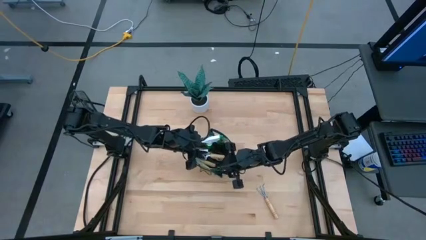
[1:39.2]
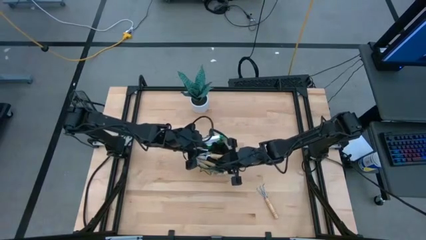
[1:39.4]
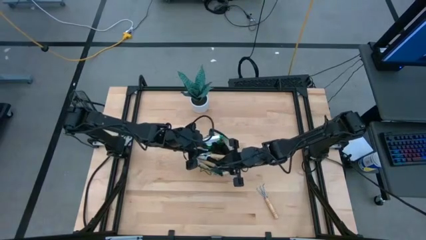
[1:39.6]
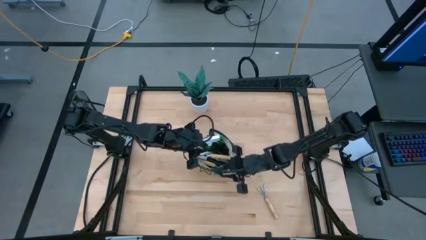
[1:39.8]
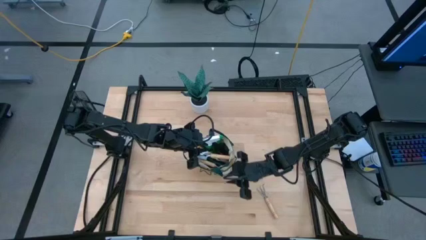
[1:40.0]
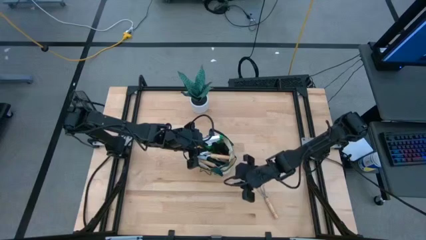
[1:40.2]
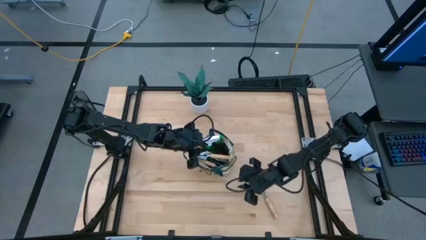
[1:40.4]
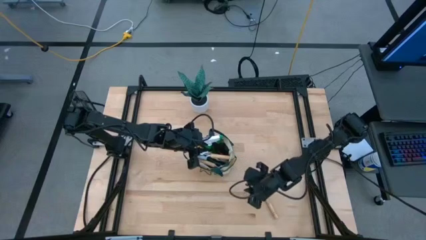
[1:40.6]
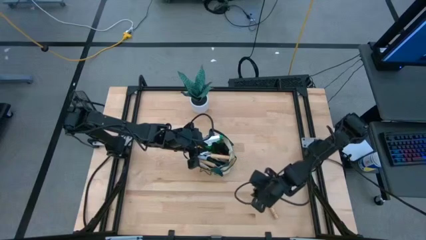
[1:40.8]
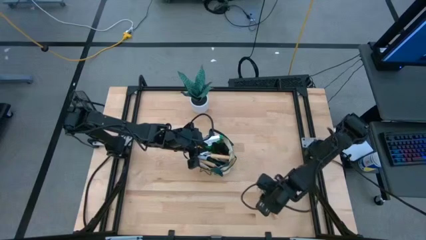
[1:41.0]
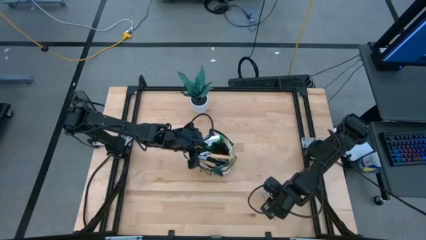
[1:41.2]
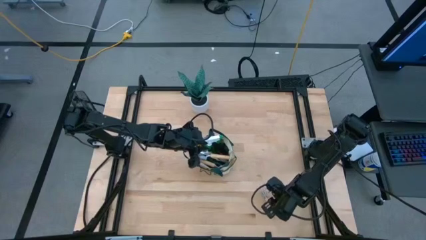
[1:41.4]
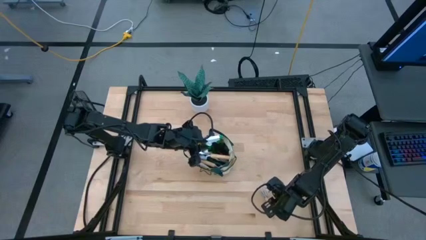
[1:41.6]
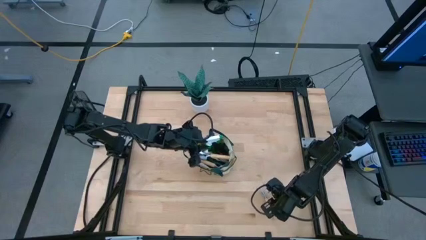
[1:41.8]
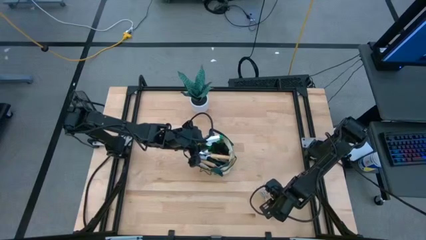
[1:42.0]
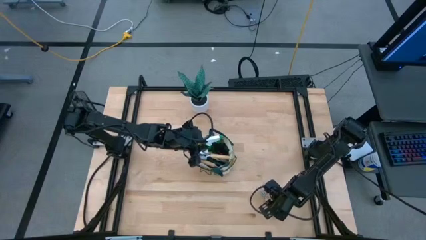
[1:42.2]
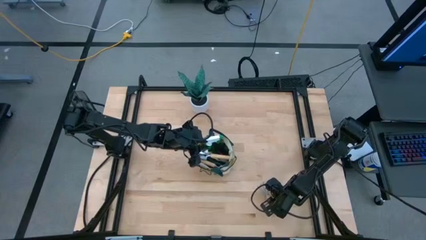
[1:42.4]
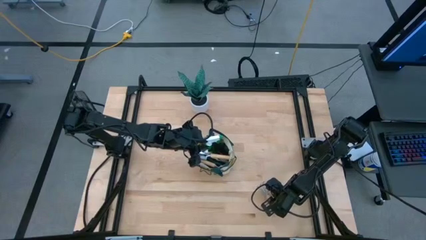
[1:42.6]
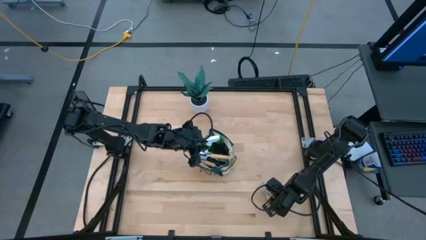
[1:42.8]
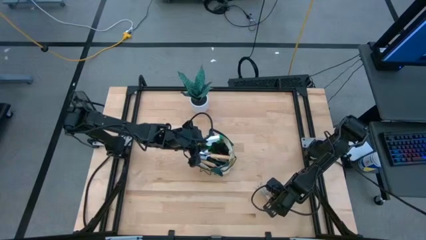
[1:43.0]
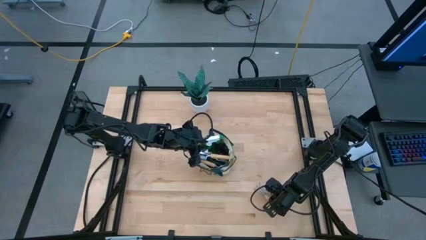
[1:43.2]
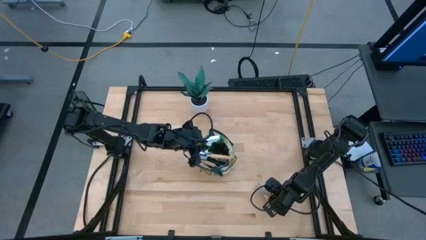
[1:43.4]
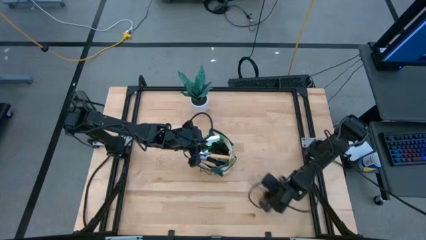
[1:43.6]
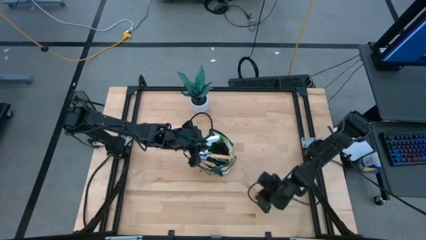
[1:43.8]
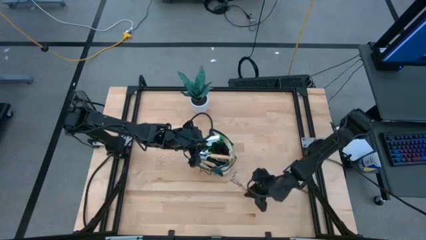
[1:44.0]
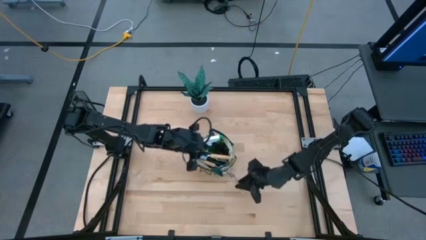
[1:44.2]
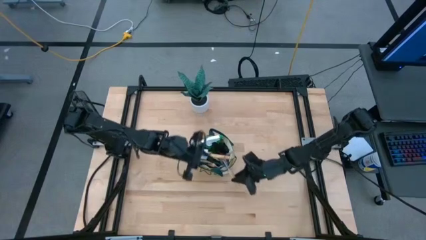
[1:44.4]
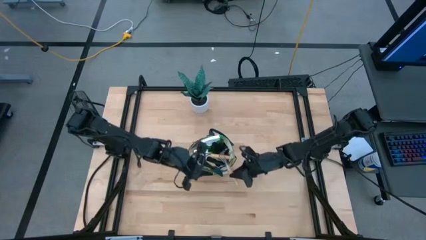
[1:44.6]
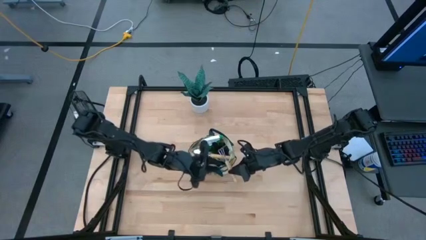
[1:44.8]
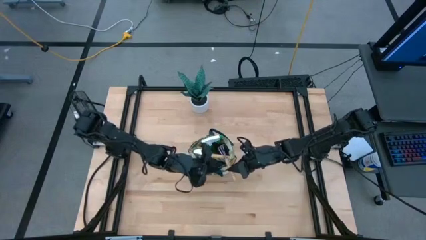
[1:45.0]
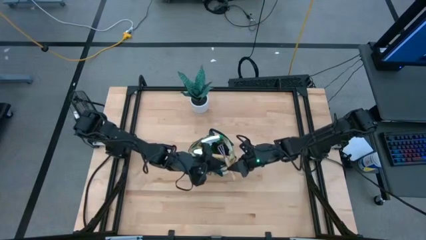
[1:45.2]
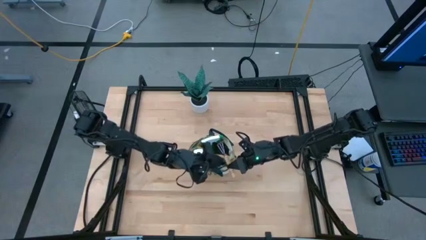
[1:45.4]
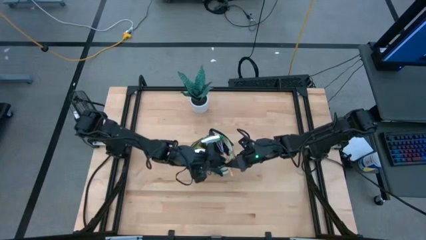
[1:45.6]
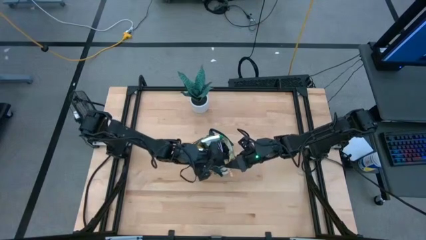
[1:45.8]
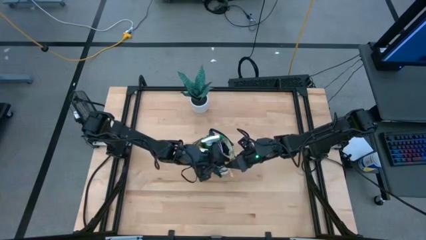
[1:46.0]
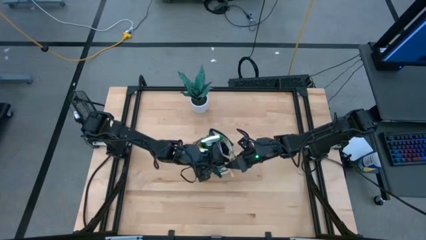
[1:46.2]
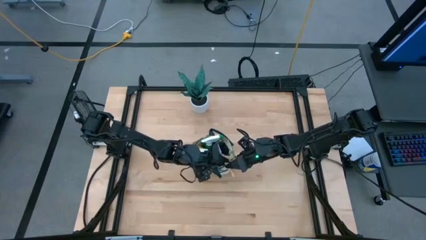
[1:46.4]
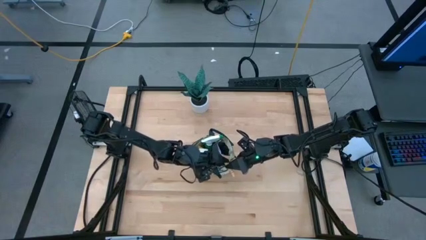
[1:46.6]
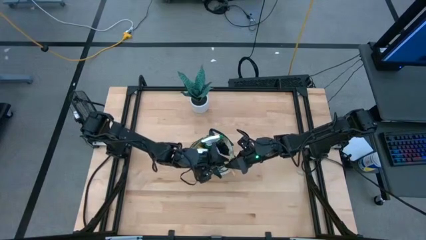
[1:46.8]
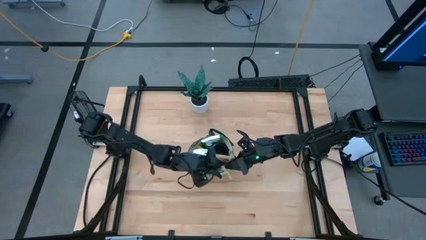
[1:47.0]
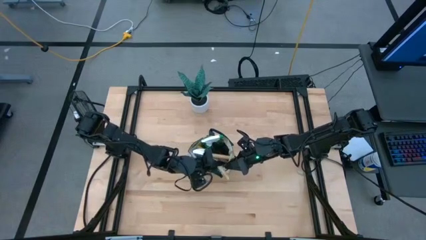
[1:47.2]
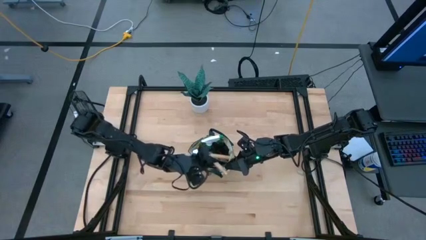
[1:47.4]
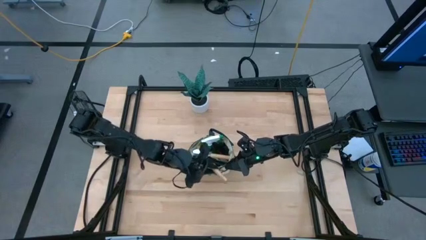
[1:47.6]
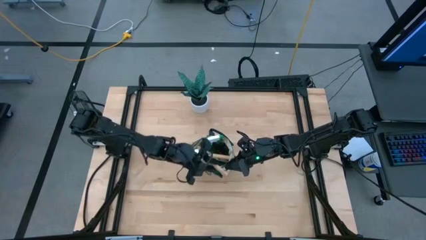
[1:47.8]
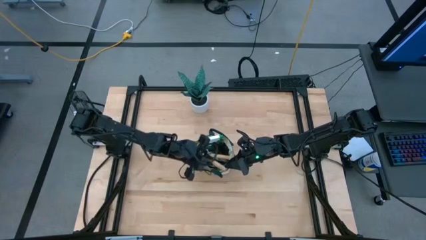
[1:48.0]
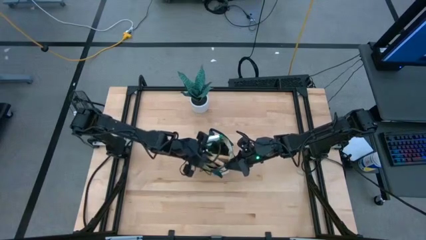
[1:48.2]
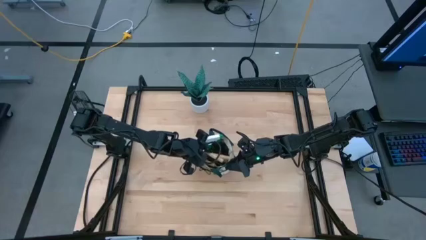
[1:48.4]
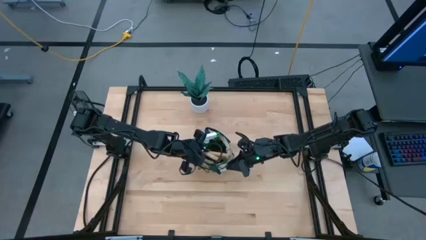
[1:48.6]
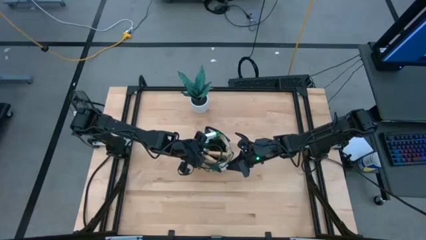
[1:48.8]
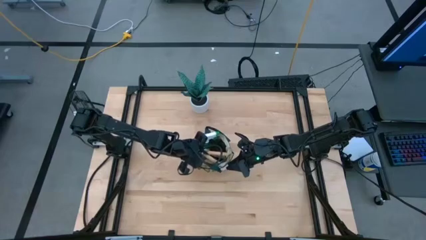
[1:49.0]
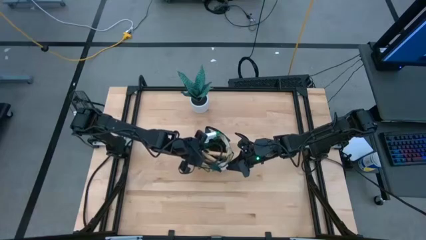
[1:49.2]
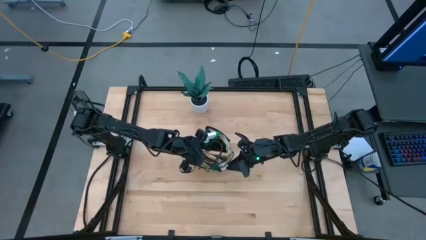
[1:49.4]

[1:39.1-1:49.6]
Task: Pick & Place Garden tools in Gardening bag
Put the brown hand rake into the gardening bag

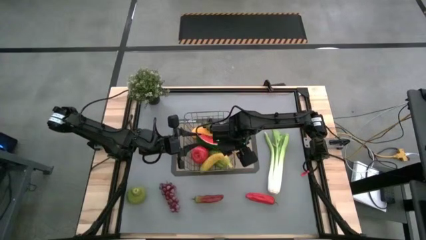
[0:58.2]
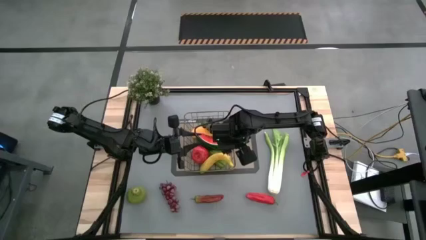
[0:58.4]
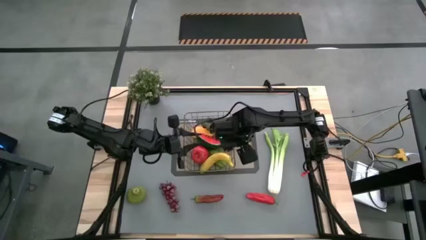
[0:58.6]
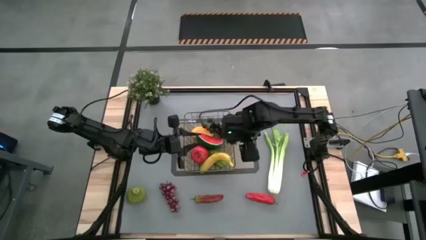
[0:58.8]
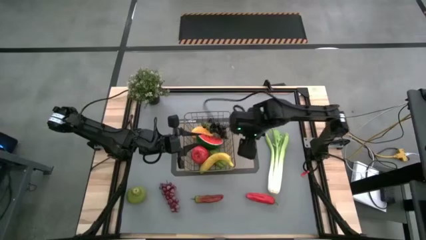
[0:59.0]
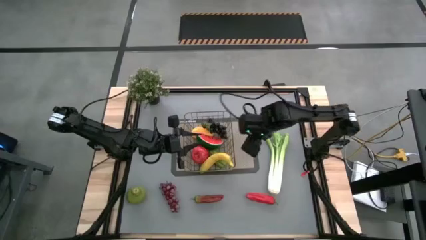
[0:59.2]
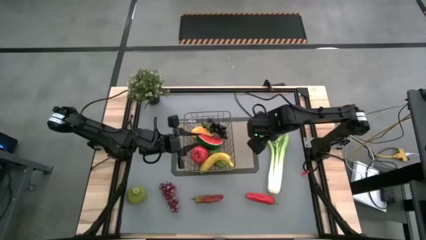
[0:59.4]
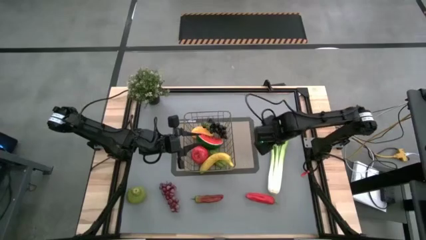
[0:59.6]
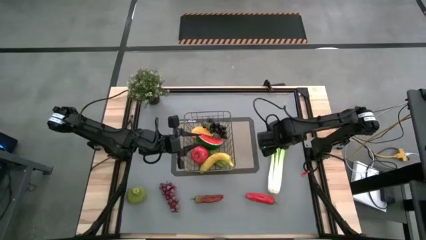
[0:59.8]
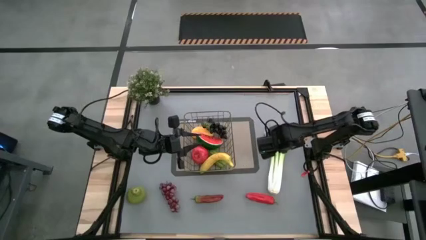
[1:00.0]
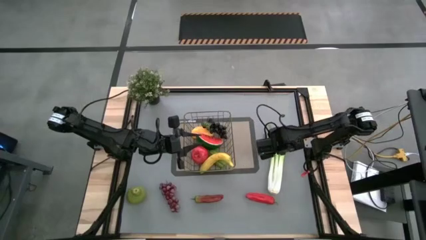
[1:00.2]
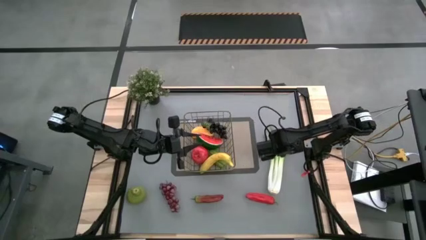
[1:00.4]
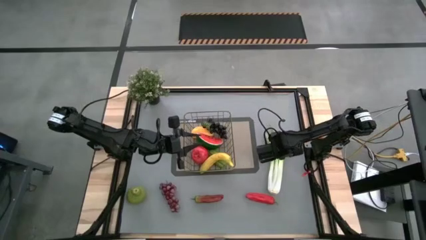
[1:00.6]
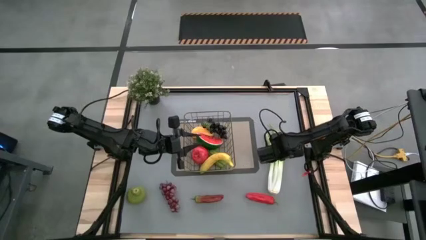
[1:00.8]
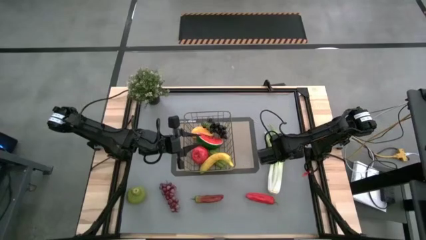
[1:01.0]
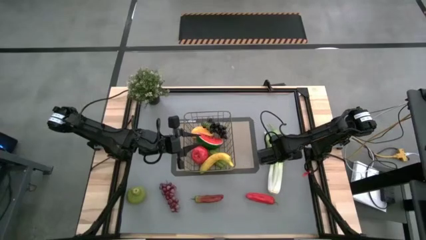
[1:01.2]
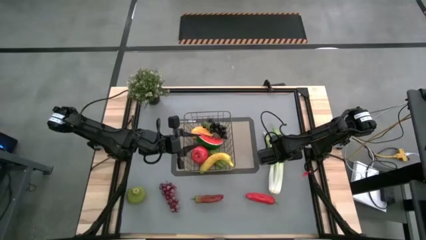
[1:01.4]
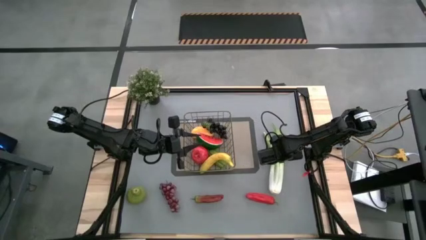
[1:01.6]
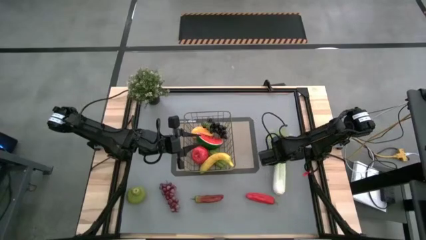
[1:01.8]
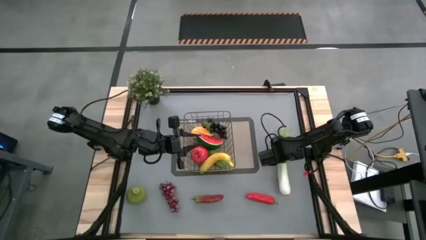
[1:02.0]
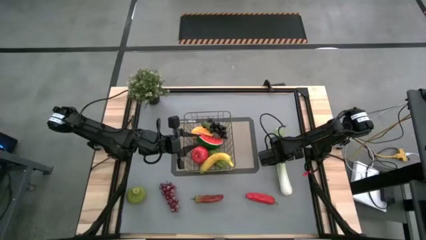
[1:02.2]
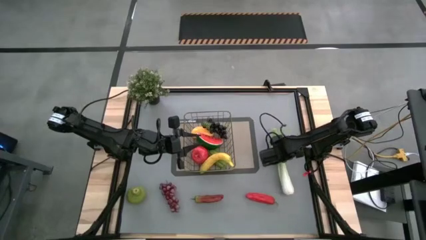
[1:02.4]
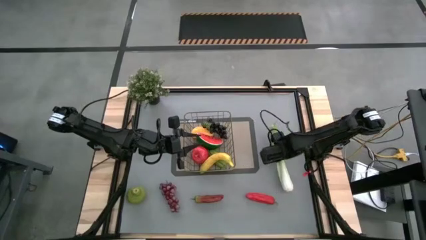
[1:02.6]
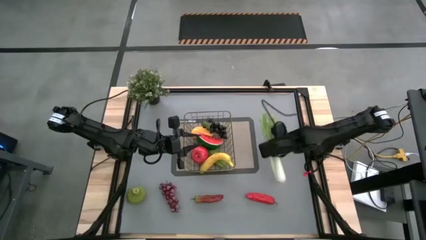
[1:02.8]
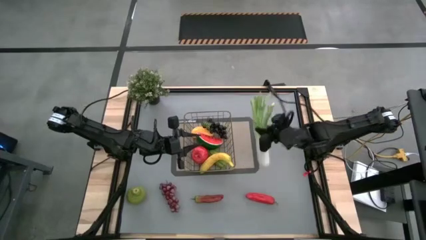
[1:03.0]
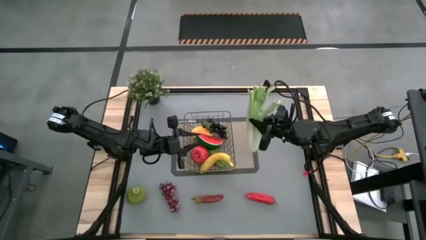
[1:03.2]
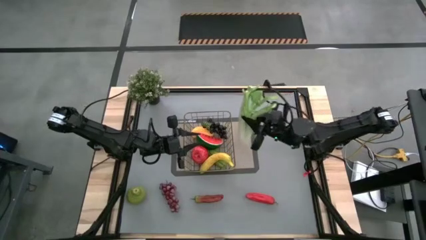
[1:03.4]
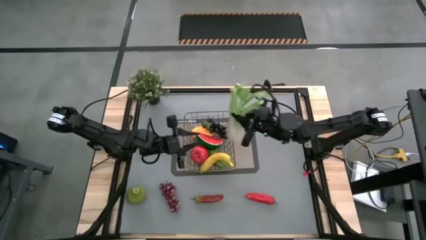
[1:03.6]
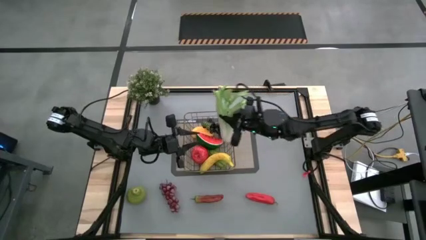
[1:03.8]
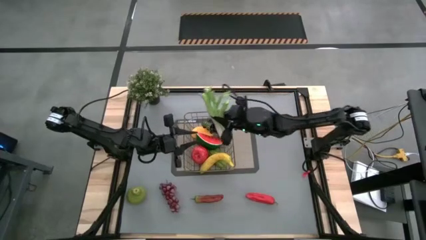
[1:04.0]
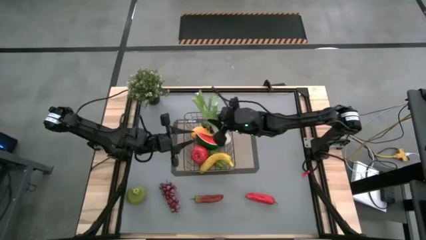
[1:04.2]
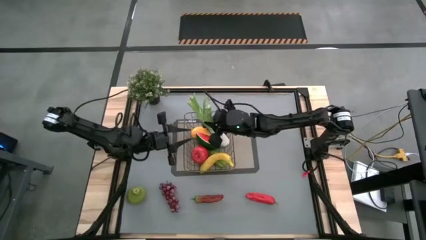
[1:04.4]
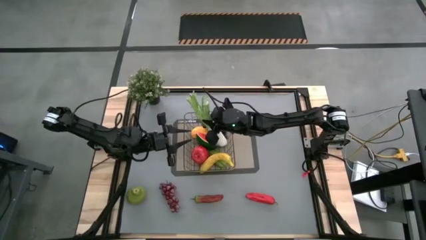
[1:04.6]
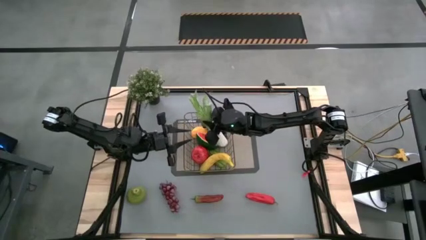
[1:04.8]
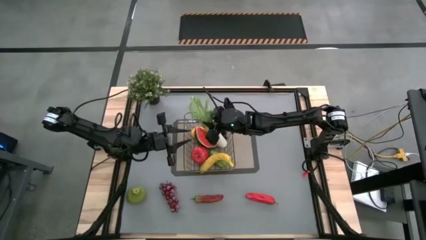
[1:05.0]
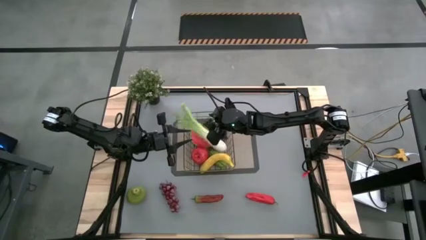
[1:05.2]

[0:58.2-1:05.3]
Task: Build produce basket
Put the green celery into the wire basket
